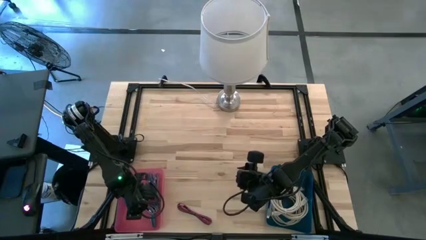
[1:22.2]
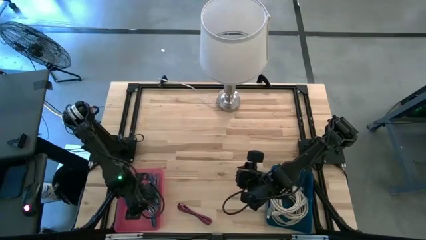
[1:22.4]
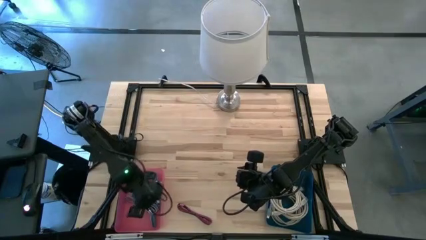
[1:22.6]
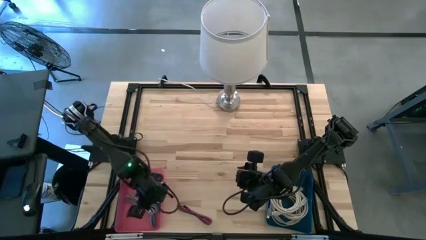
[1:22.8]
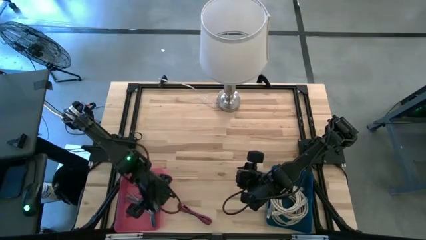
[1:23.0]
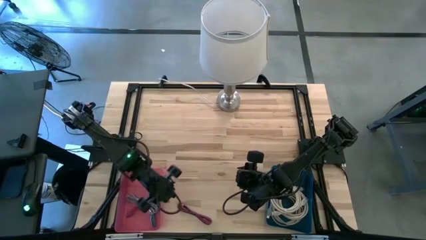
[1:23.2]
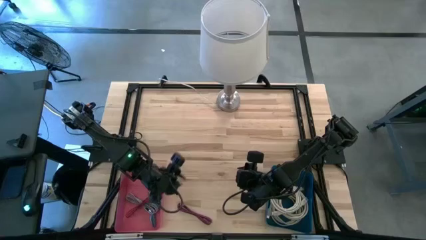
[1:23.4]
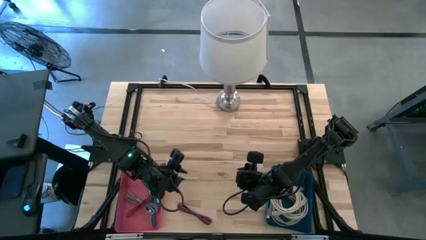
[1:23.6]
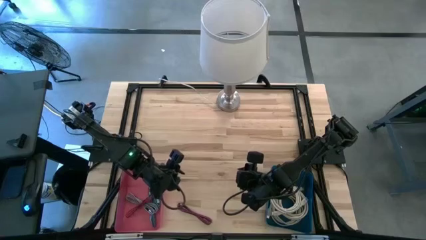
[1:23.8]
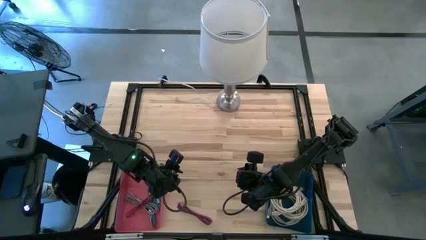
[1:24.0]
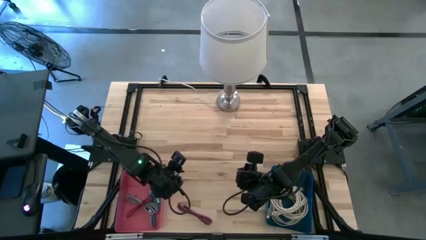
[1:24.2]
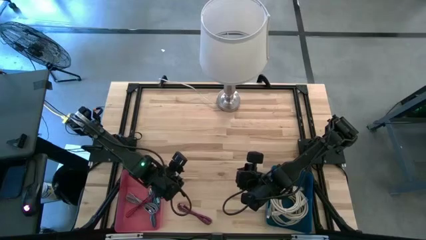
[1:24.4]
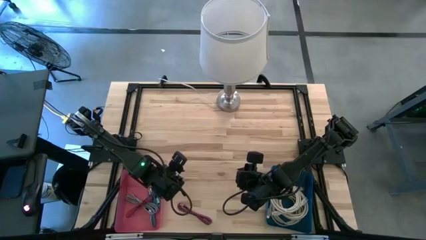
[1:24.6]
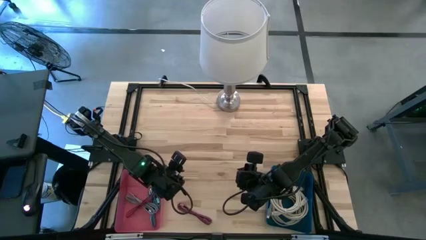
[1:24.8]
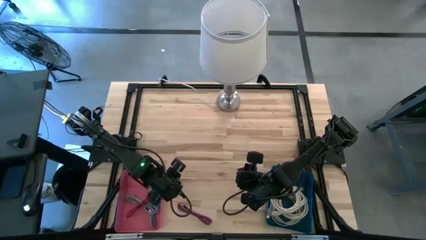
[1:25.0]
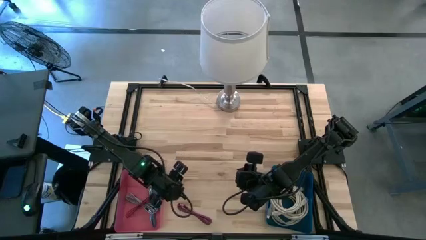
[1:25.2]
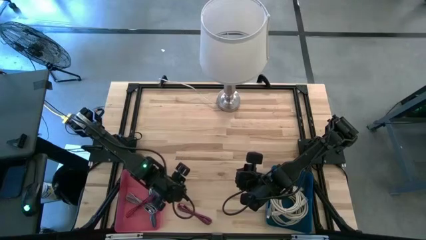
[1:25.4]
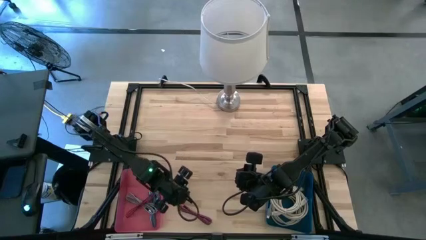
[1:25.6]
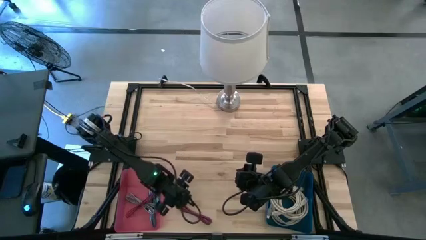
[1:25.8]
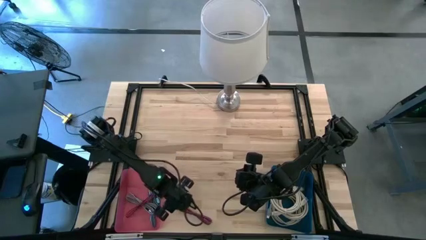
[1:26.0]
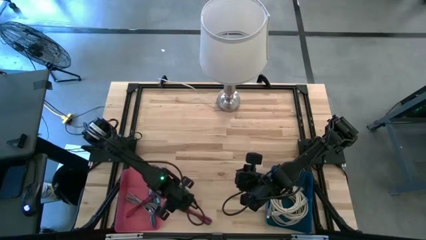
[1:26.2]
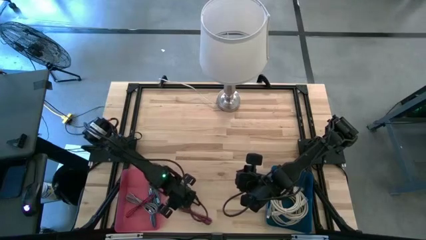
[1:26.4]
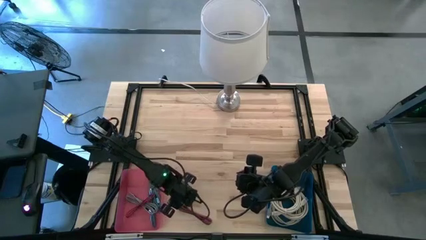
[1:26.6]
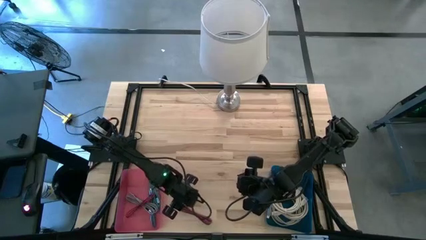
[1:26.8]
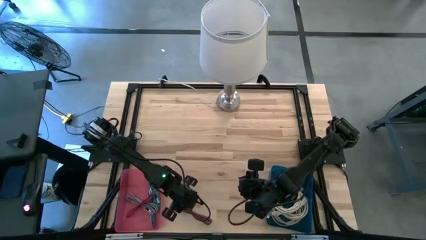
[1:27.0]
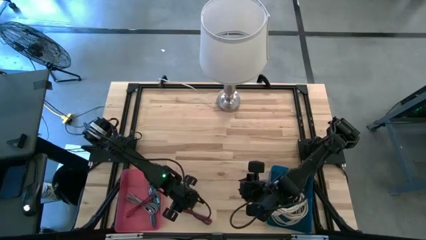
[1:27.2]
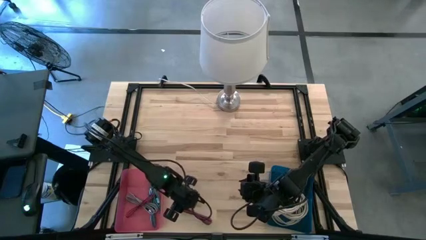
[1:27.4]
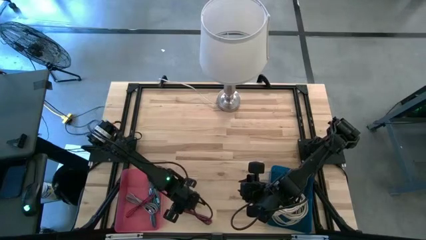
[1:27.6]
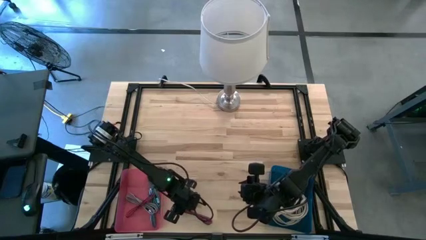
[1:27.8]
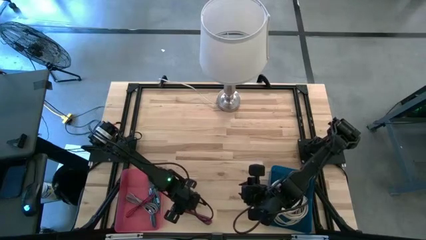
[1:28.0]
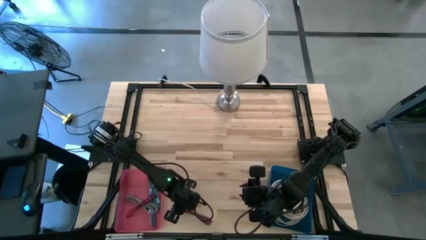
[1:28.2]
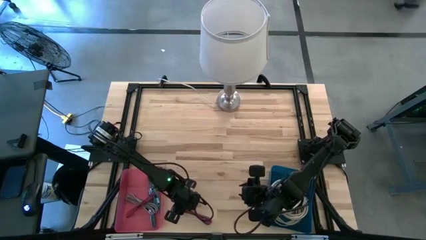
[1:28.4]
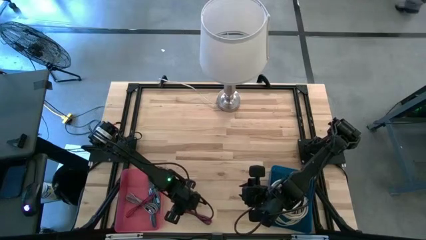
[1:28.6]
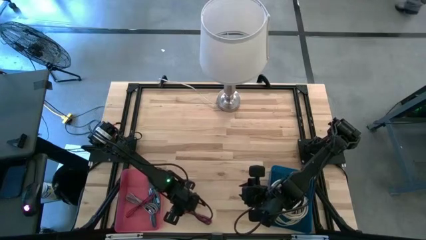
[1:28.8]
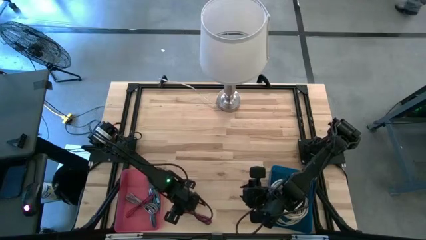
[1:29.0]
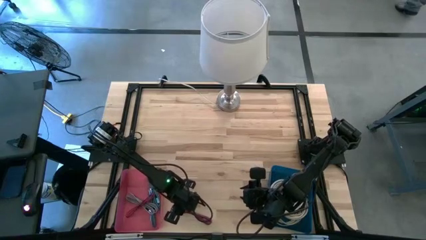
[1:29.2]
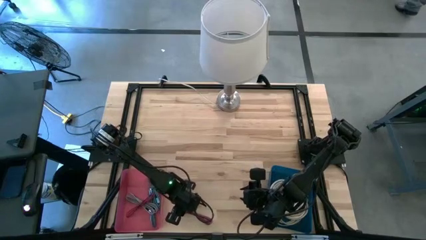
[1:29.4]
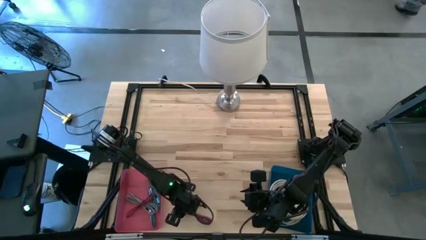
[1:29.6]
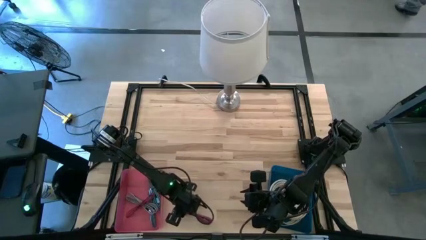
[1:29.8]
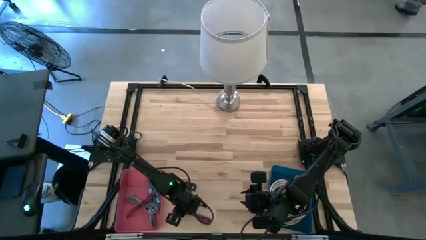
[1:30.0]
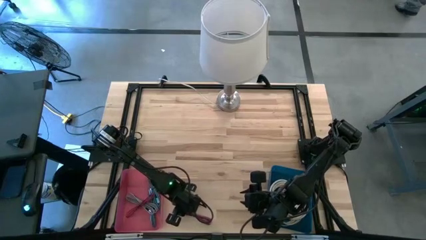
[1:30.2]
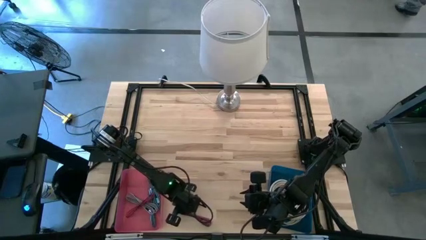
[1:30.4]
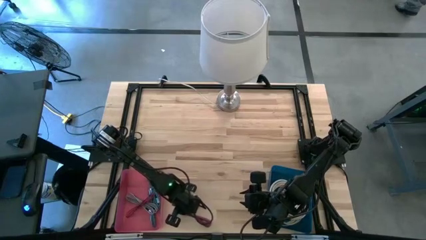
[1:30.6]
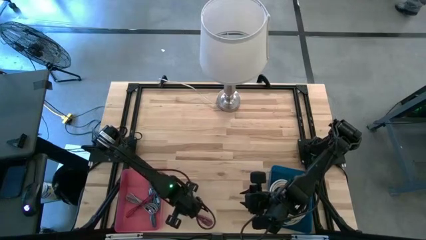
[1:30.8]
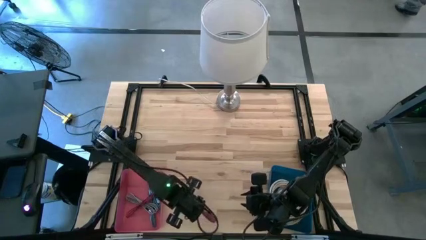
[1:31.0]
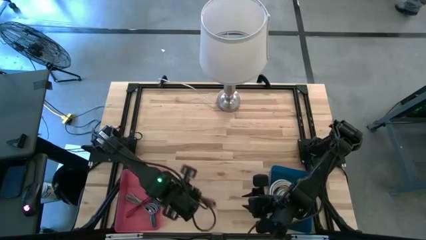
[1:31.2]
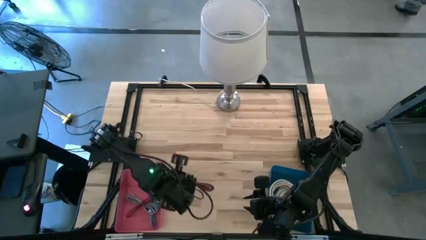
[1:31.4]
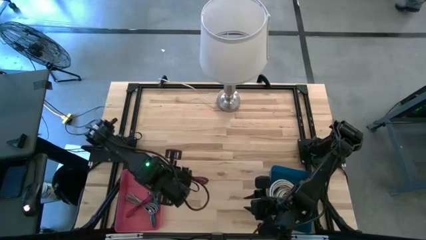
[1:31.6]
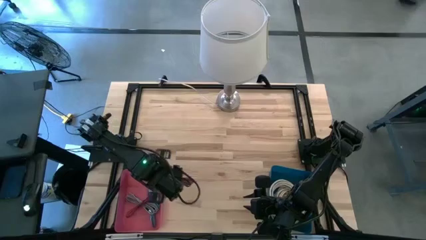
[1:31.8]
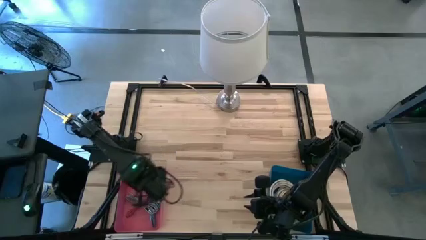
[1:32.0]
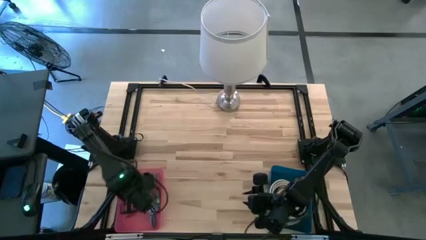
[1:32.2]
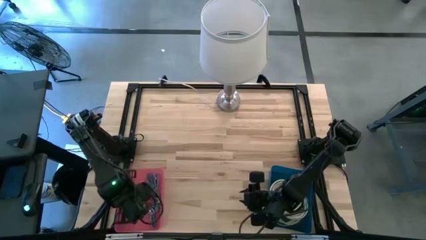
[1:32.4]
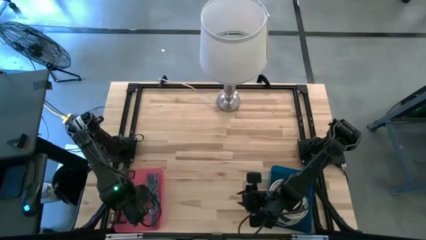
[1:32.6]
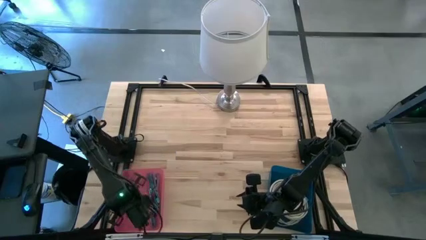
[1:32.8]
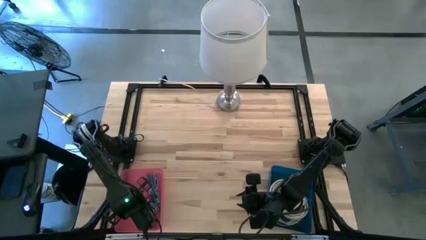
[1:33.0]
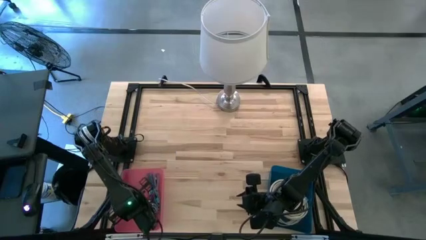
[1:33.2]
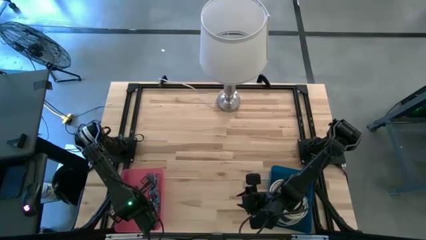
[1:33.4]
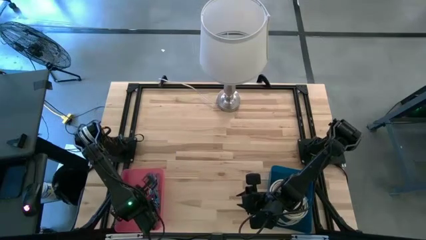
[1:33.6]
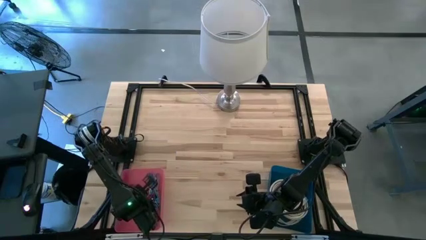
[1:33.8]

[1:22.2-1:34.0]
Task: Pick & Place USB Port
Put the bottom red USB cable into the pink bin

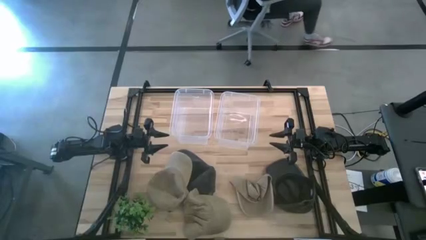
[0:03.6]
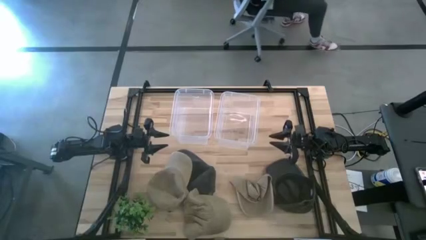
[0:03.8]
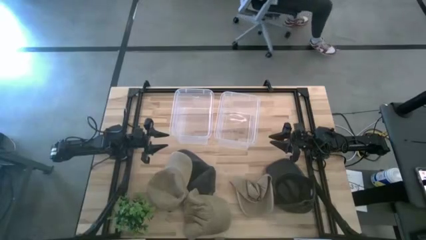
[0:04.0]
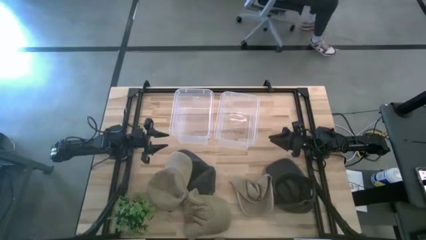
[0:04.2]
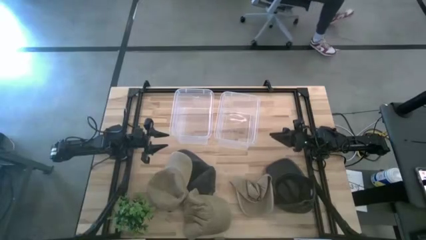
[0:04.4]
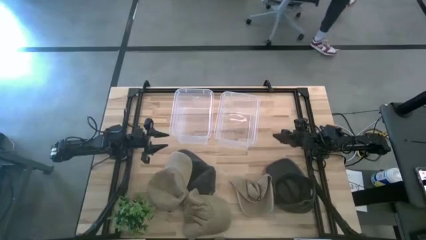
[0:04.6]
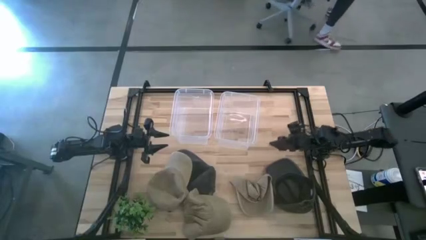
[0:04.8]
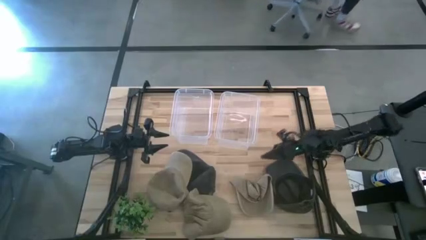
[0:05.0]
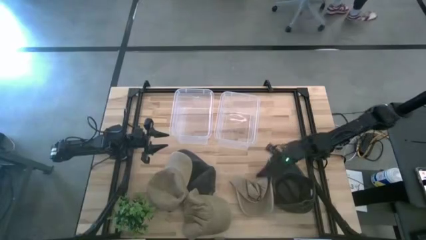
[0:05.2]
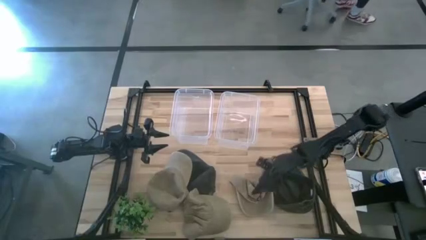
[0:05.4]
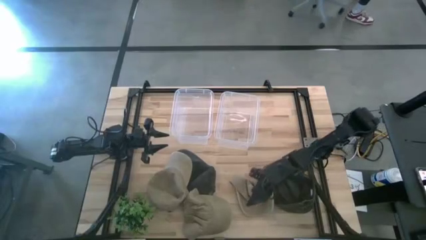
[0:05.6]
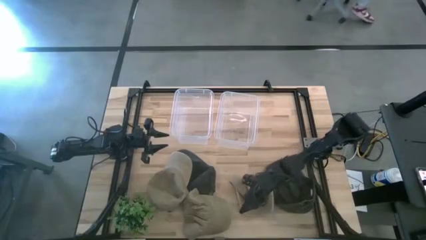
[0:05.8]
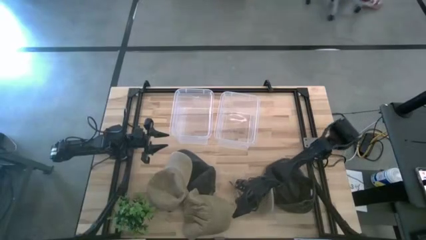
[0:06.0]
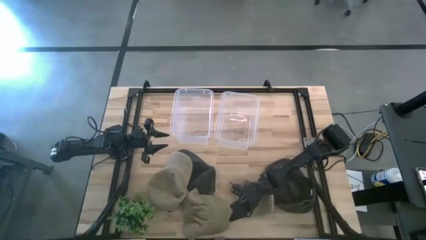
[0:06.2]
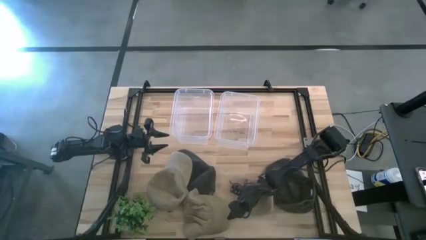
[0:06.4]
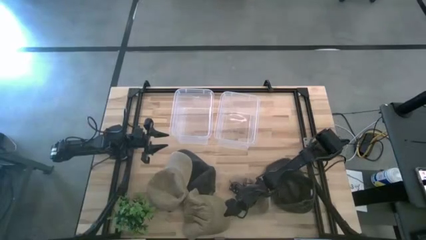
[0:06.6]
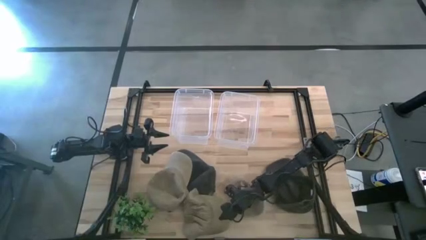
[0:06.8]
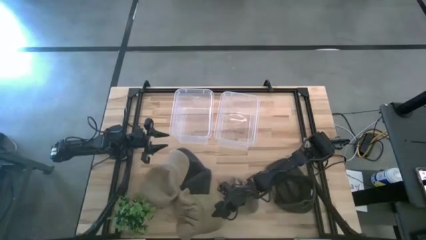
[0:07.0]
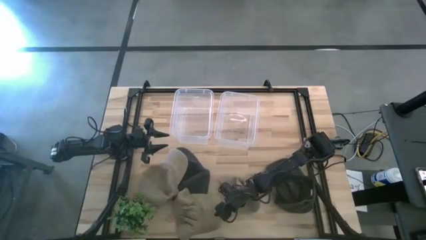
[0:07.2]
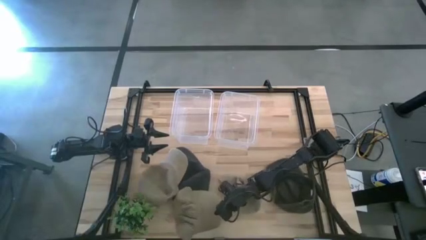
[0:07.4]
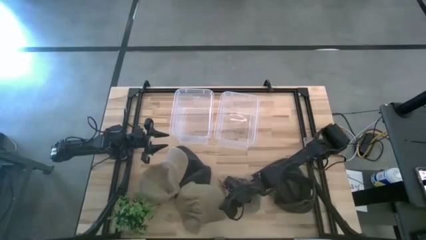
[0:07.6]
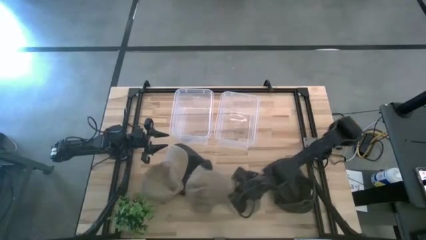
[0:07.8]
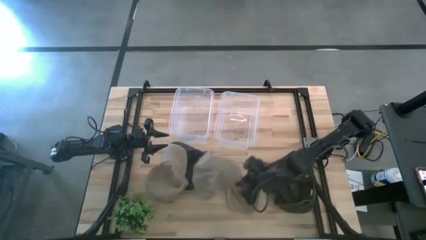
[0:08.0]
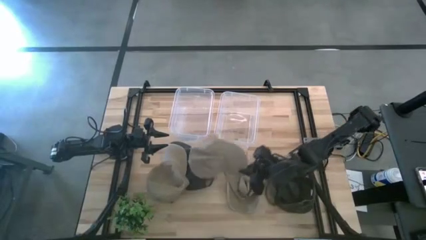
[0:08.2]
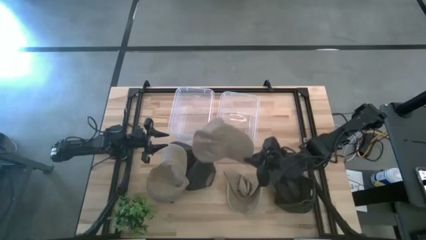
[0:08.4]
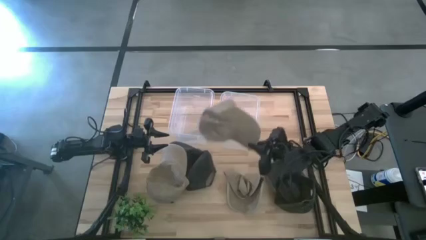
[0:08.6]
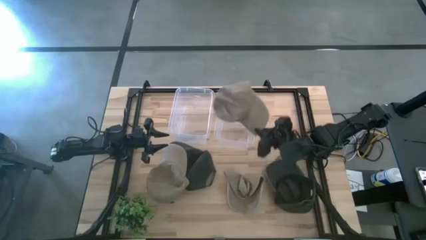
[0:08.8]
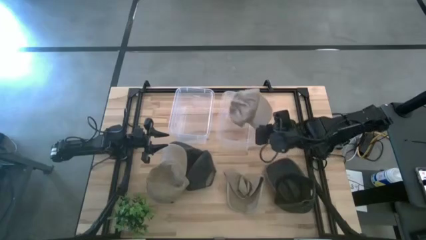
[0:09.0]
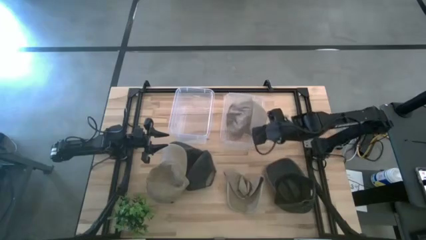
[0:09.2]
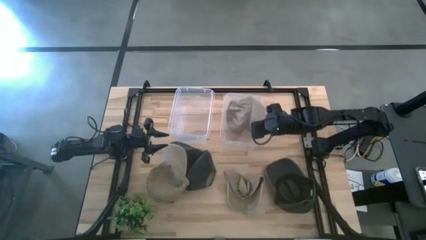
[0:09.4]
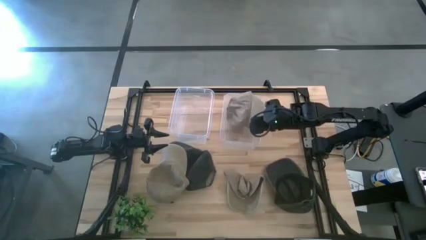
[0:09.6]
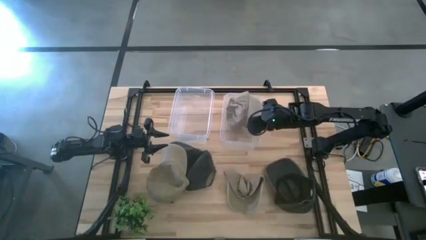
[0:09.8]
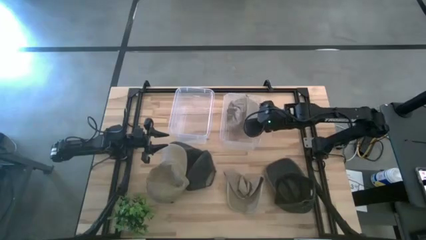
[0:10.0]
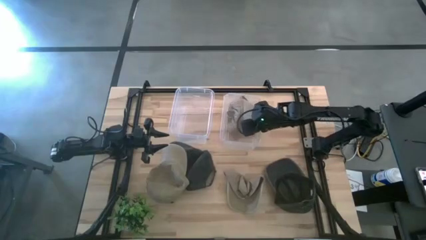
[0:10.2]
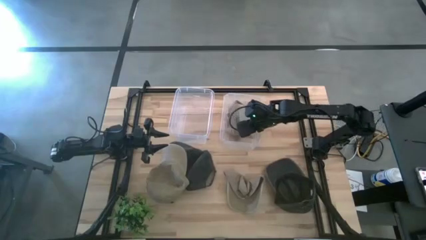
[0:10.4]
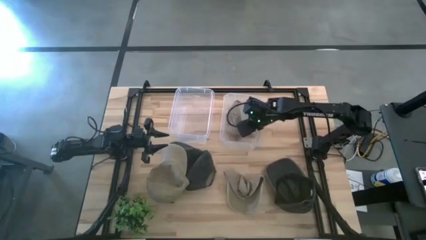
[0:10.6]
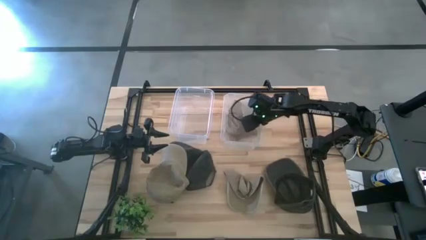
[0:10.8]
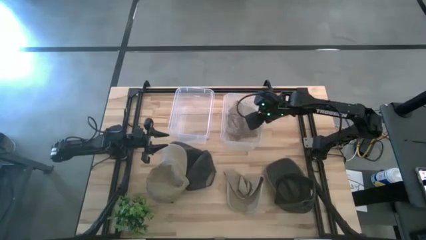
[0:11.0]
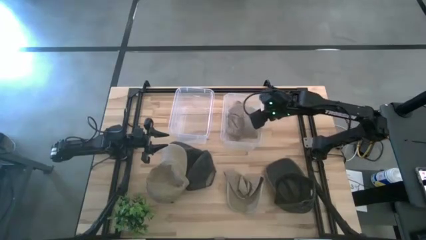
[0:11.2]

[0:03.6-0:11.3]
Task: Pick & Place hat
Put the bottom brown cap into the right transparent bin
